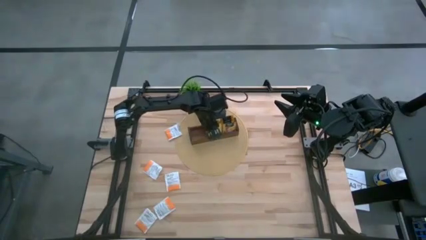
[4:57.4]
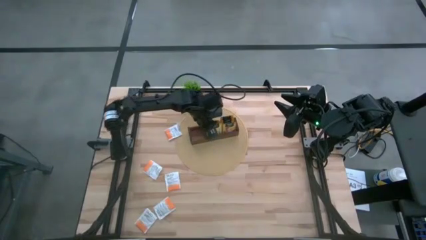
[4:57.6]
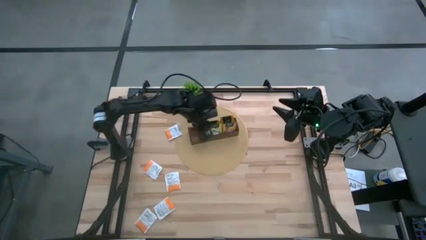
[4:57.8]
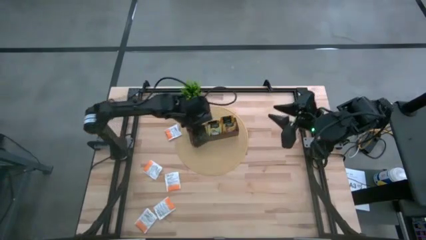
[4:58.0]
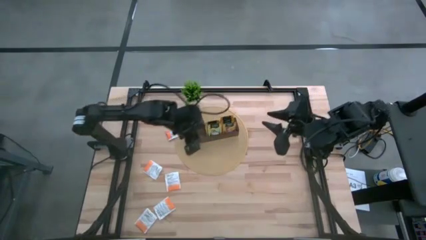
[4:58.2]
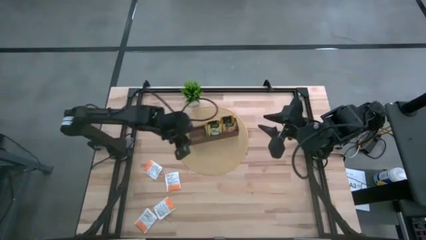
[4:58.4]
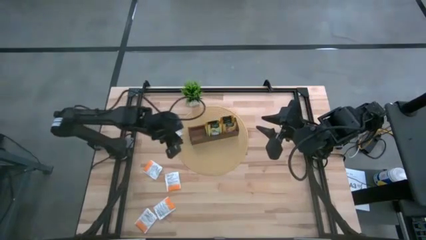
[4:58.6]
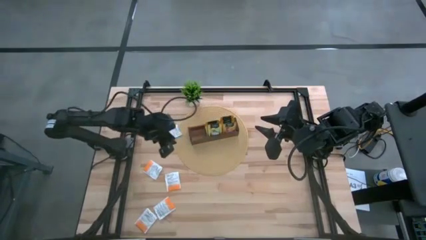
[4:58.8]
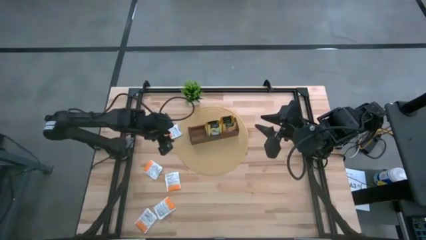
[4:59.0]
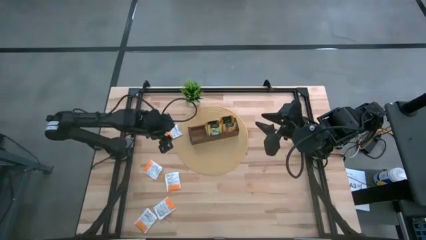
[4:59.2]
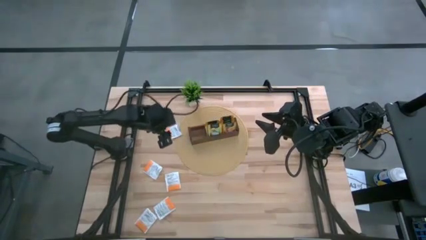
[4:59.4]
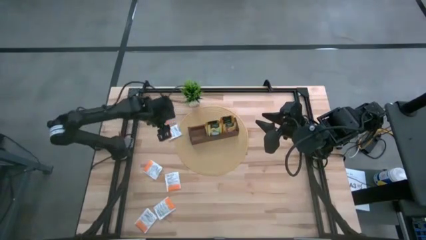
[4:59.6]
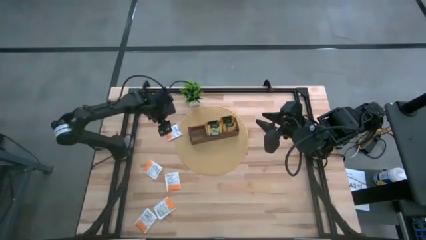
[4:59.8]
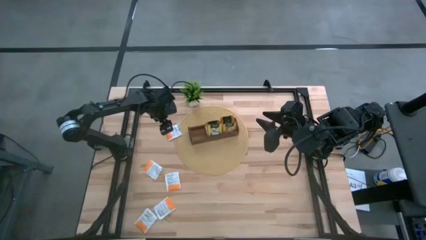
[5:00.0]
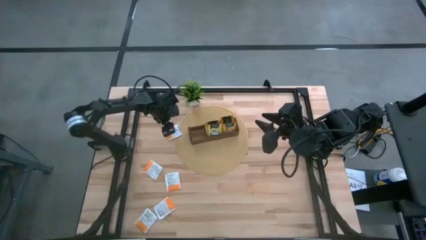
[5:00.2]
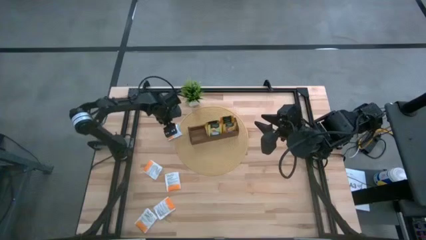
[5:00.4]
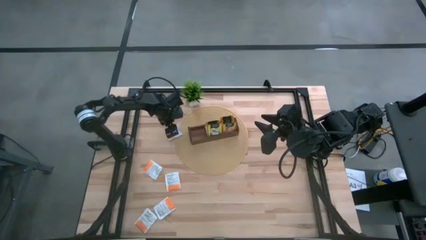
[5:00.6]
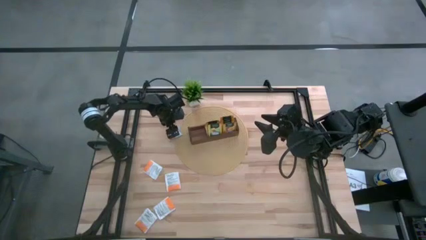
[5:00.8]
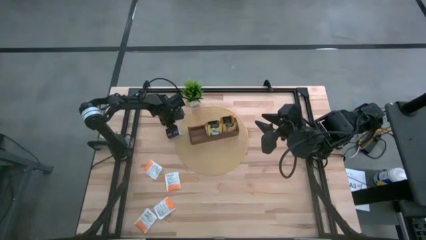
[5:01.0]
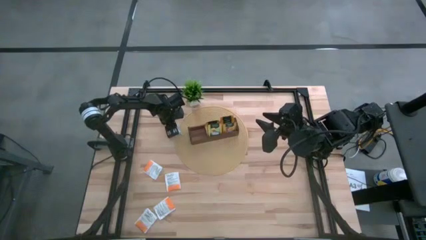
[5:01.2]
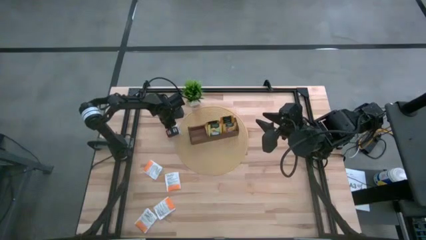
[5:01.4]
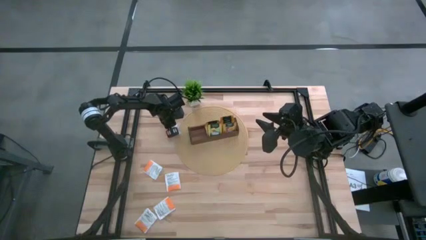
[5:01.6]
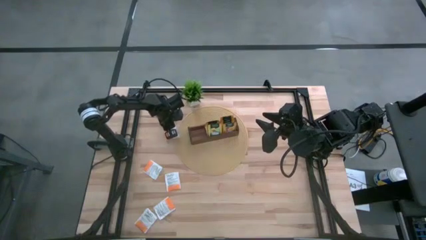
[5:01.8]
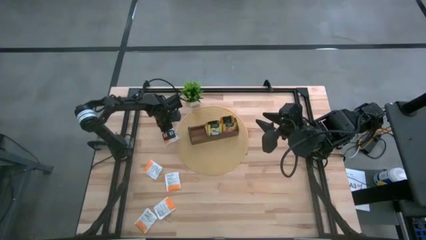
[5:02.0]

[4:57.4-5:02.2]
Task: Pick & Place Tea
Put the white tea bag into the left section of the wooden organizer

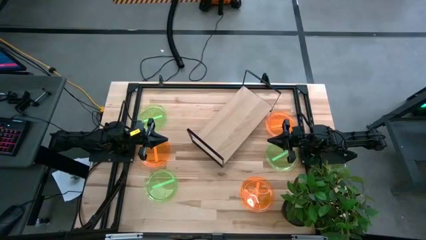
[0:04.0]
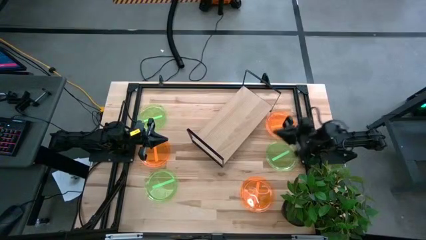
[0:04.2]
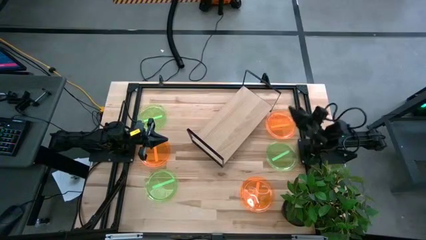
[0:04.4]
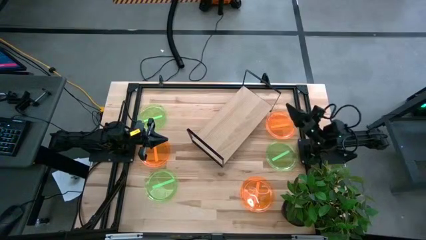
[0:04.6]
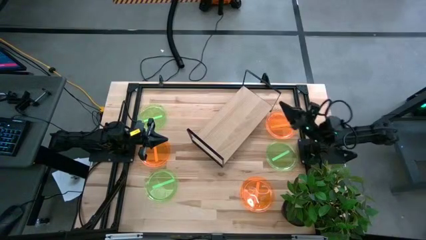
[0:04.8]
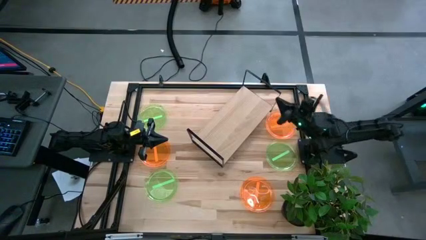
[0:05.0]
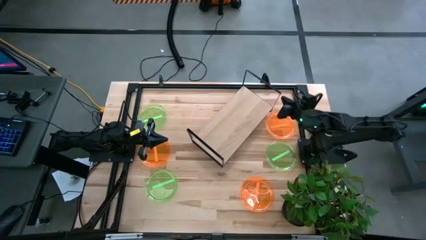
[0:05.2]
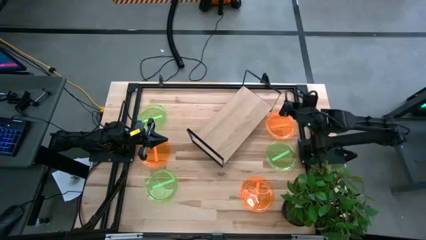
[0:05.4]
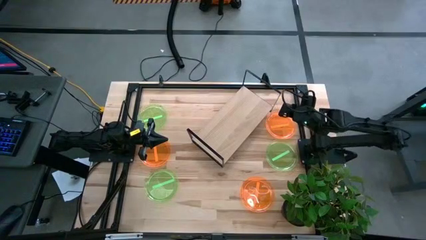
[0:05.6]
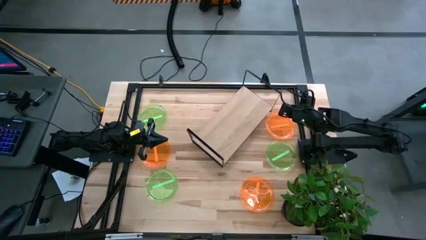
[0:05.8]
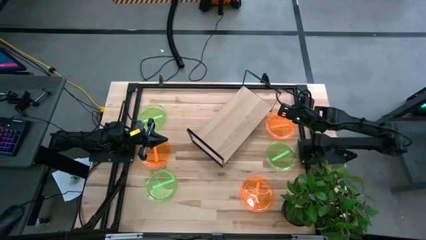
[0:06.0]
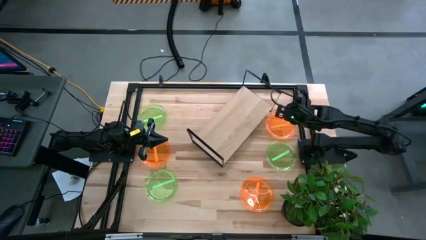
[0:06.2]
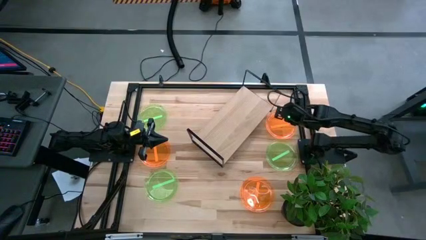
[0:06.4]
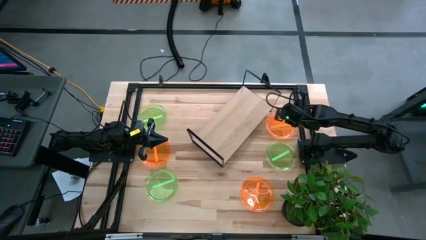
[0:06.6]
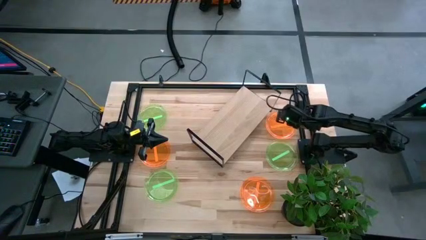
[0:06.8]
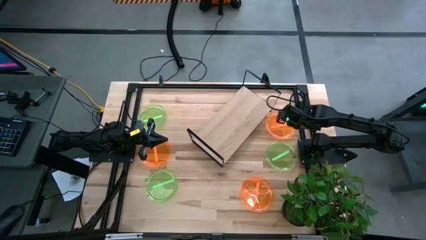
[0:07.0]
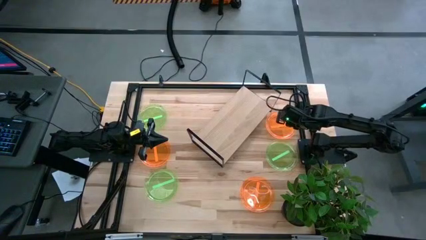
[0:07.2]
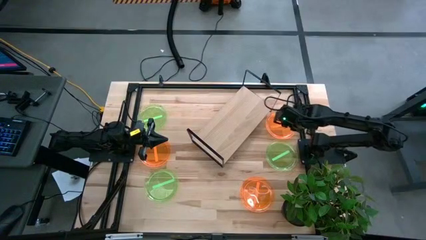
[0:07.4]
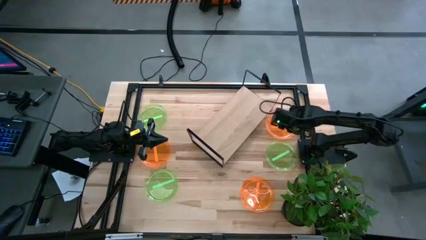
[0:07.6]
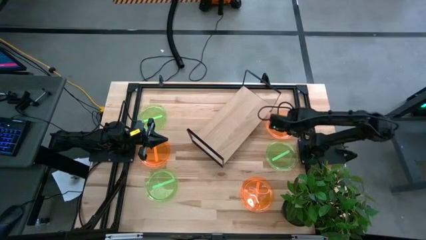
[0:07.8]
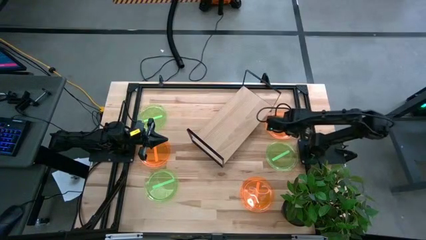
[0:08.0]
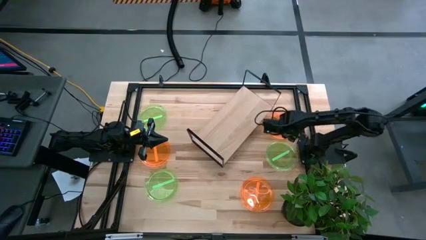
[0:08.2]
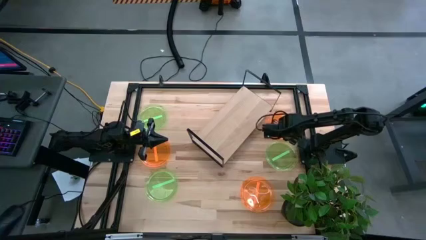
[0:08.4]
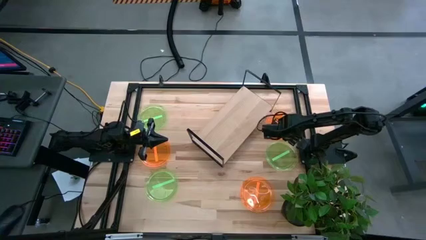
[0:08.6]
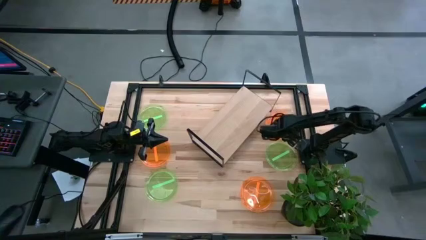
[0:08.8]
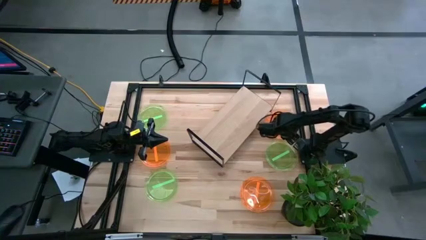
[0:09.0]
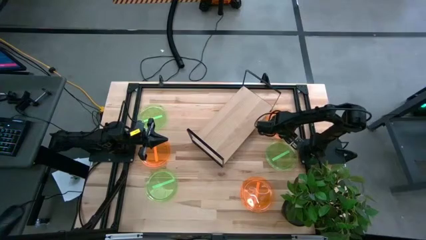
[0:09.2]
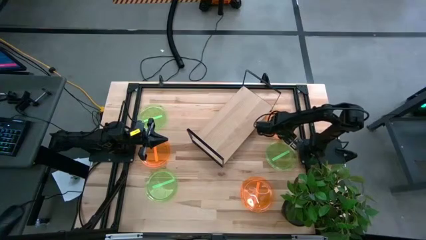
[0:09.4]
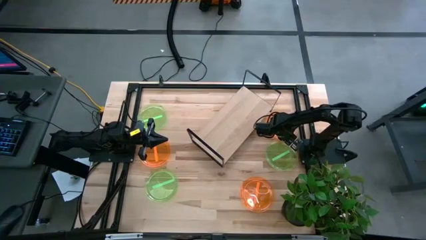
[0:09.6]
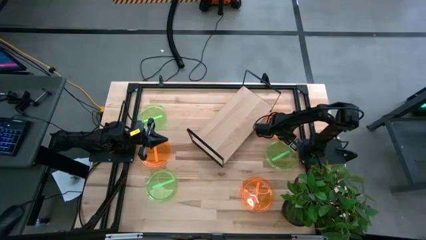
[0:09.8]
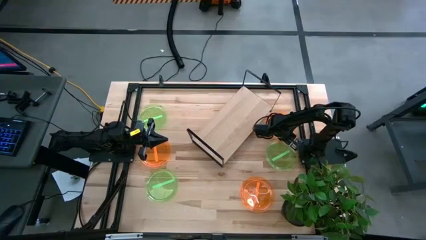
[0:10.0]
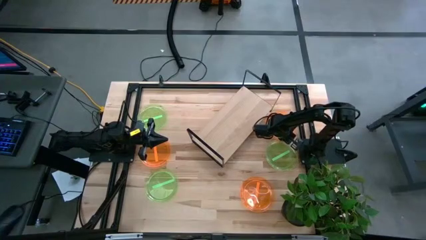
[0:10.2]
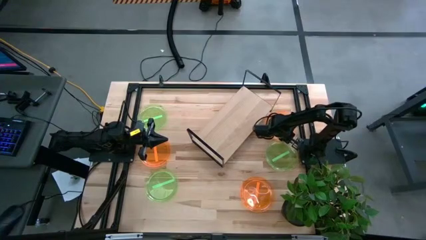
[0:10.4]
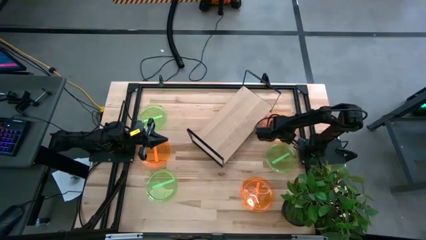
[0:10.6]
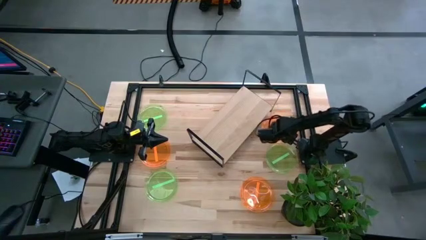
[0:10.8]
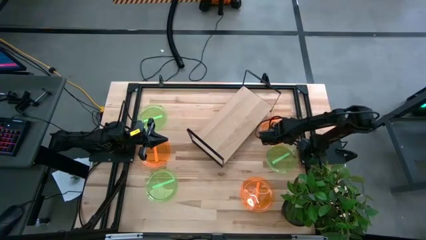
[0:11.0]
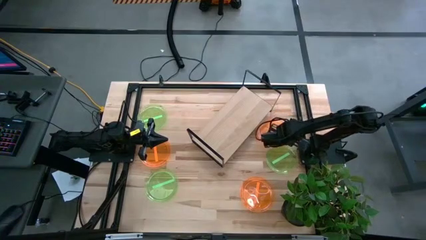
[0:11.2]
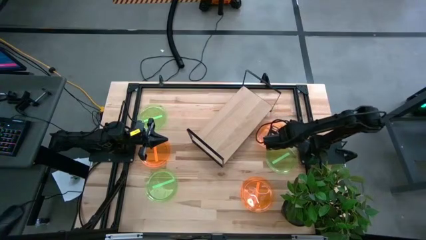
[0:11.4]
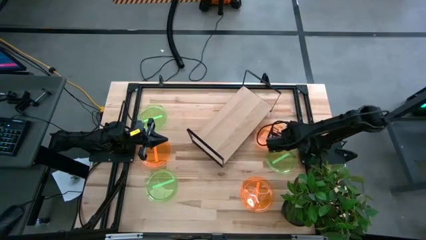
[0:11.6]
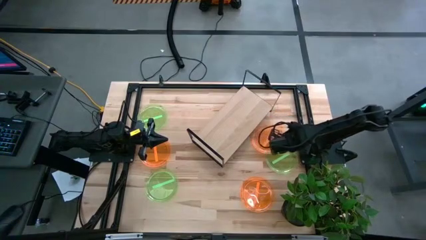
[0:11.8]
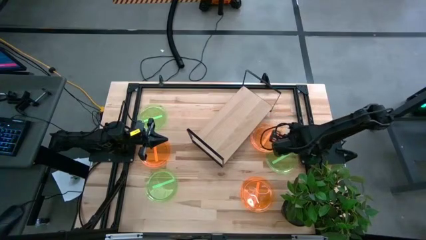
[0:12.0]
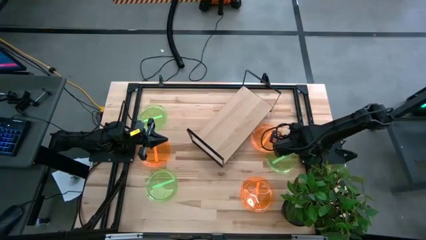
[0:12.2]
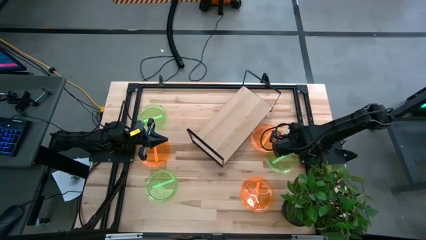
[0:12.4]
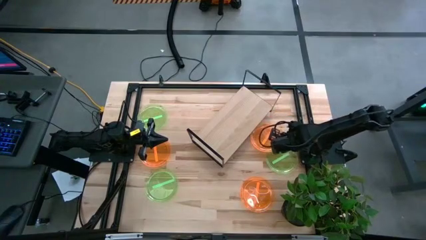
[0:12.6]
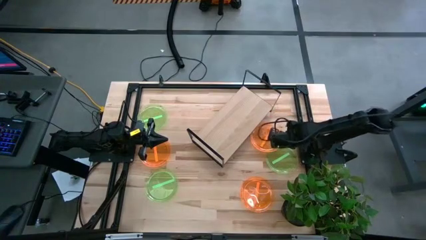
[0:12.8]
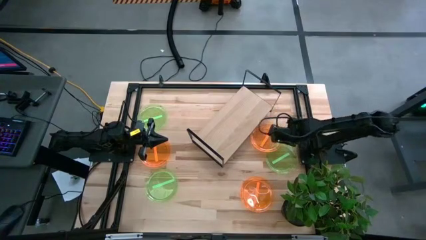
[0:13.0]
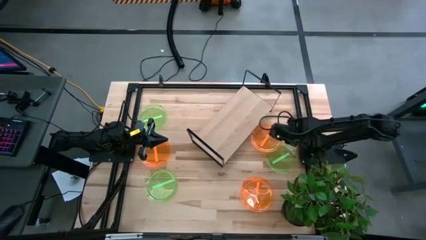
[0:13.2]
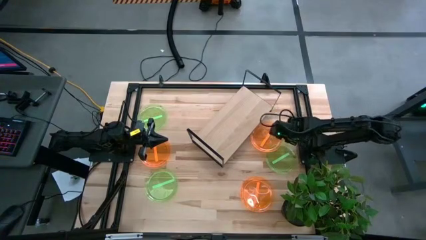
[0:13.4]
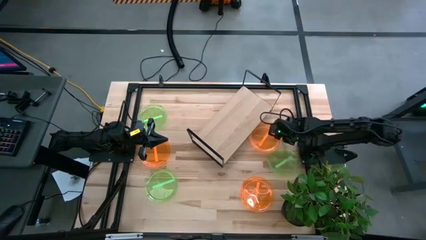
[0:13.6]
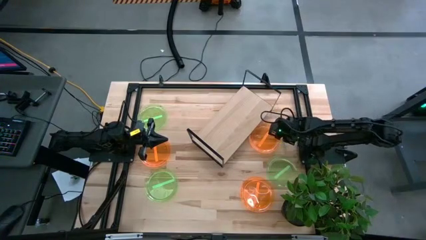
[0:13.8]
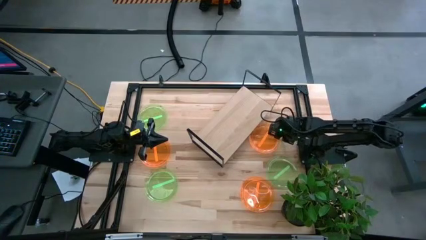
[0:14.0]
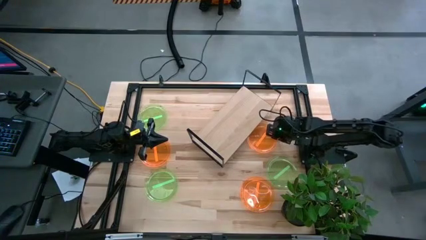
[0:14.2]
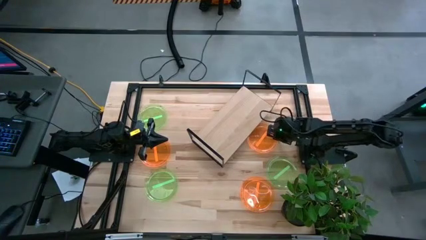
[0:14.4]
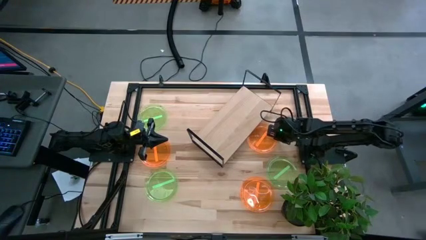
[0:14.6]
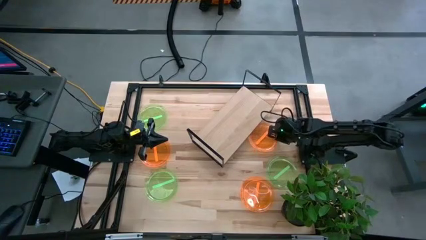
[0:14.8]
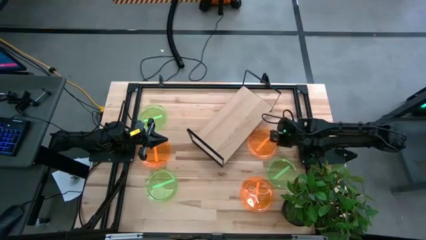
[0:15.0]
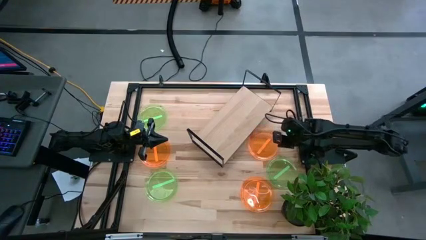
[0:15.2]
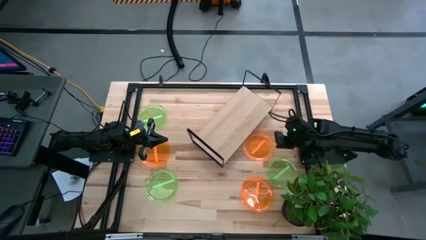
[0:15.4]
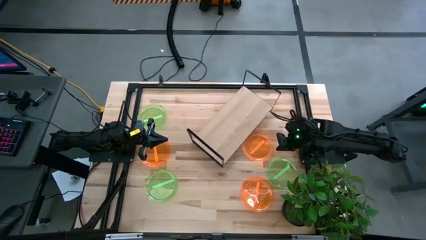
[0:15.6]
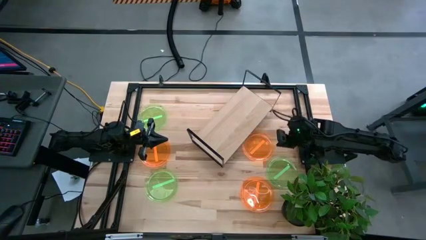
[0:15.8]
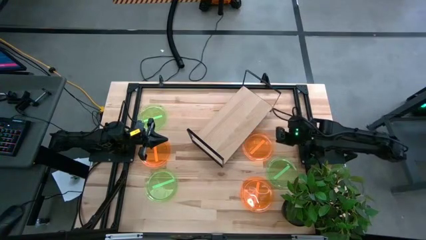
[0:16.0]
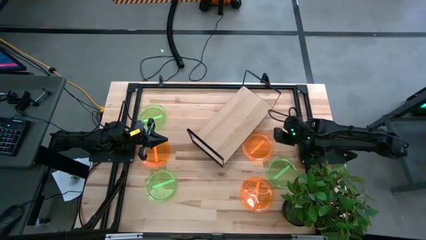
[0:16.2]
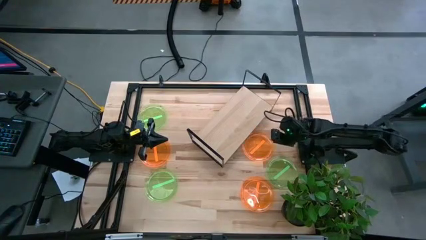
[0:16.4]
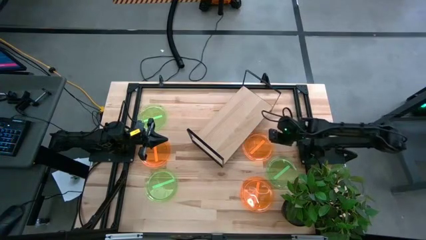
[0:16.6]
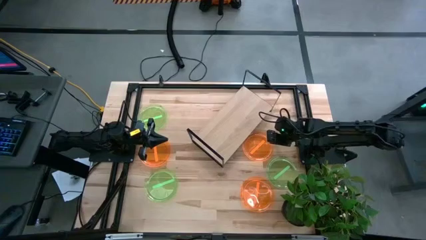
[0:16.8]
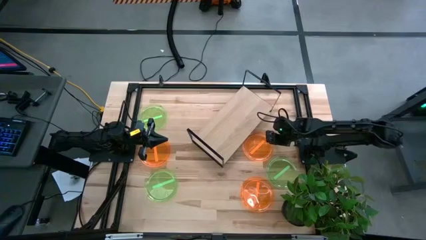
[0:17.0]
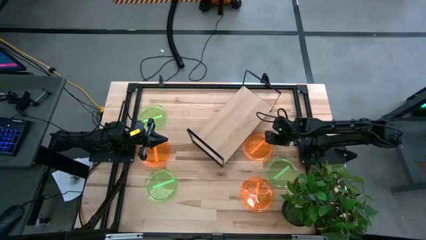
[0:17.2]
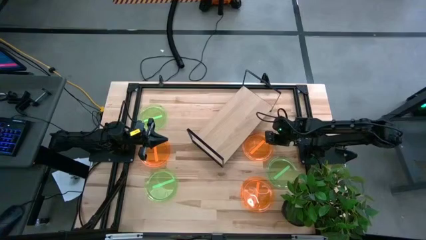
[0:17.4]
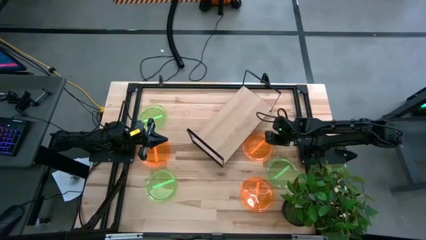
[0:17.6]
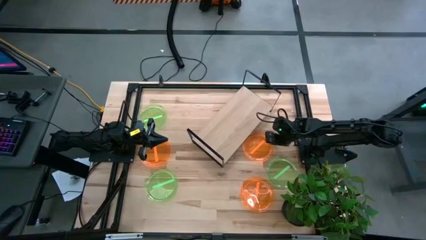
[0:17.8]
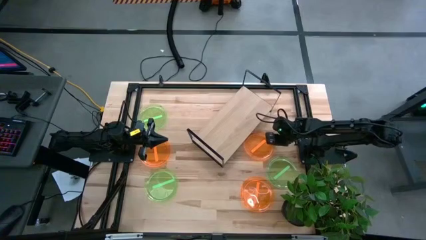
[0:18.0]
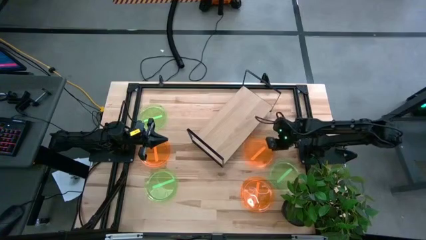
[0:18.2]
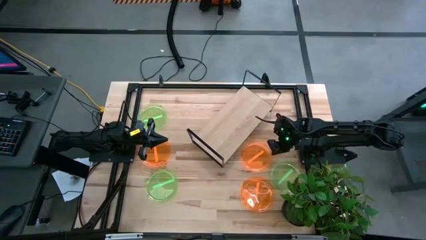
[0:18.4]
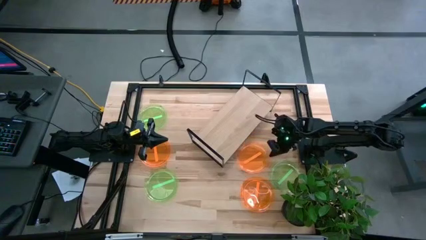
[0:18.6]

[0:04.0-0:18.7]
Task: Place and stack plates onto a shelf
Put the top right orange plate on the shelf
